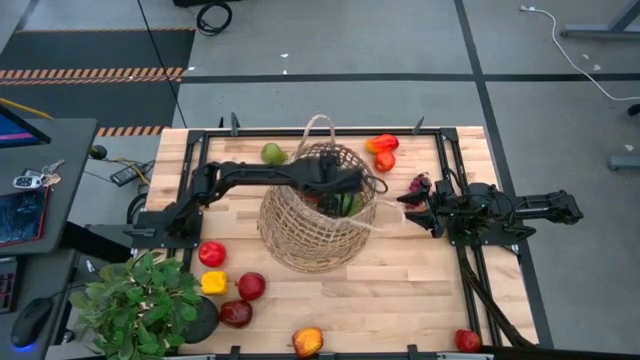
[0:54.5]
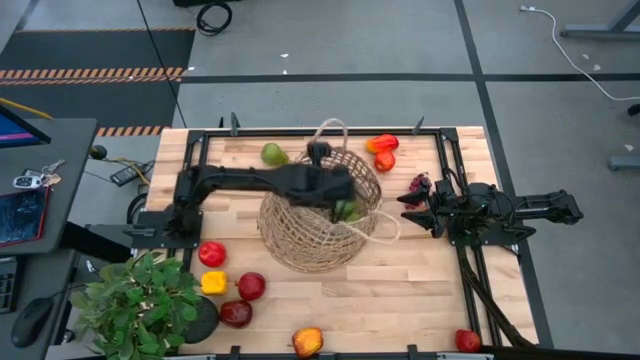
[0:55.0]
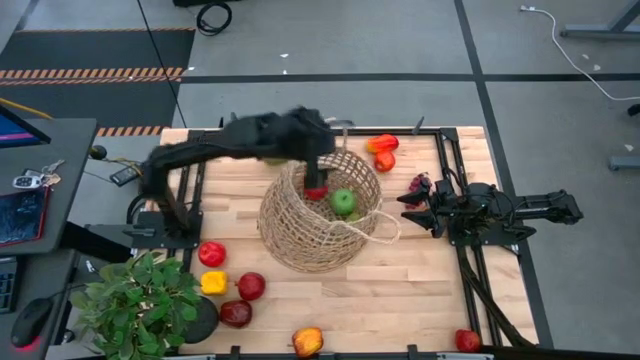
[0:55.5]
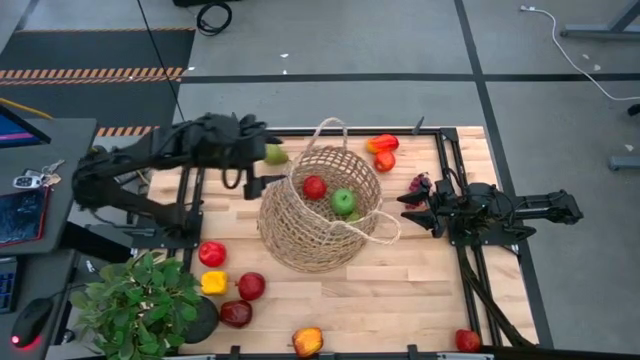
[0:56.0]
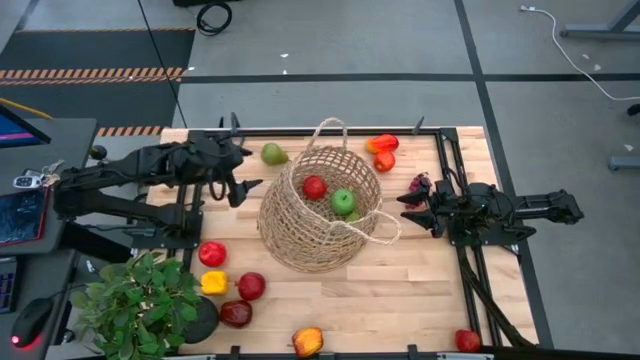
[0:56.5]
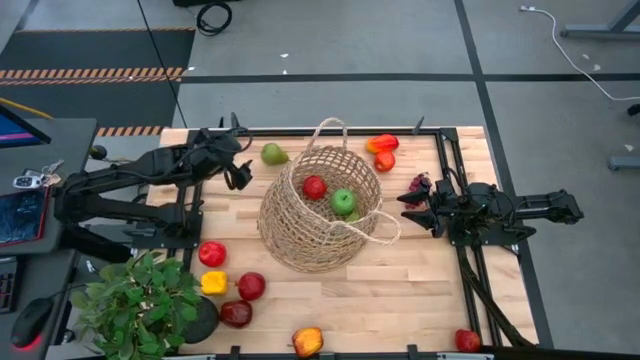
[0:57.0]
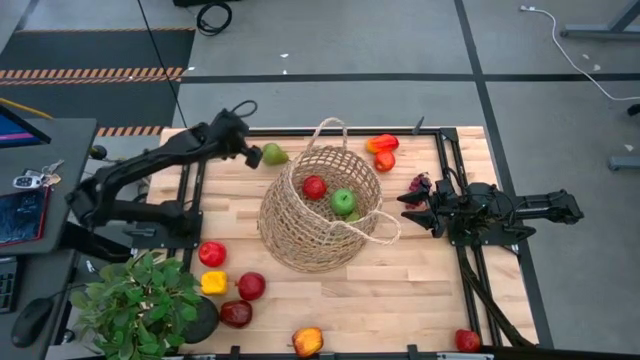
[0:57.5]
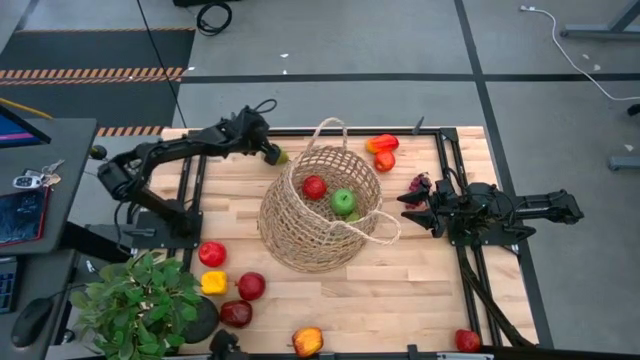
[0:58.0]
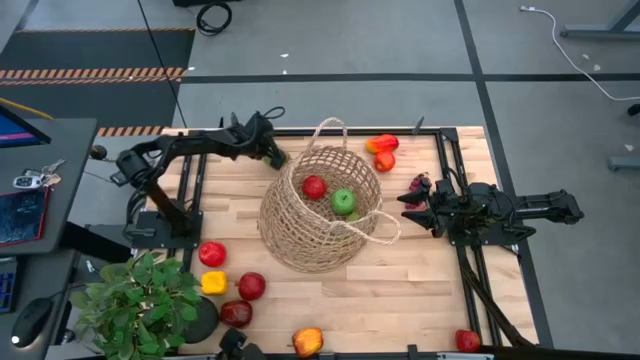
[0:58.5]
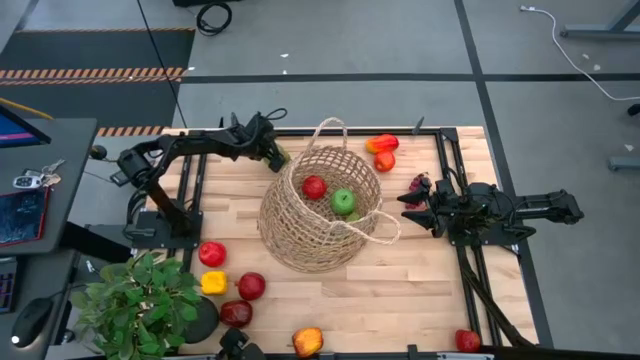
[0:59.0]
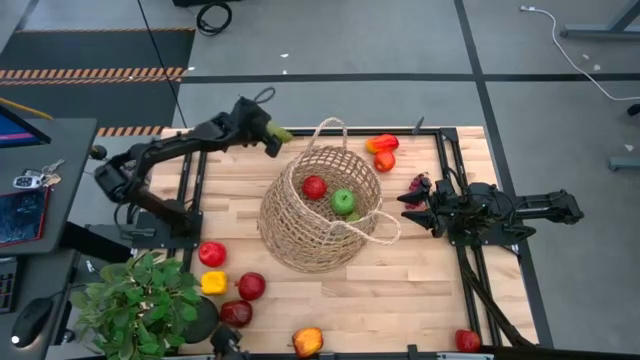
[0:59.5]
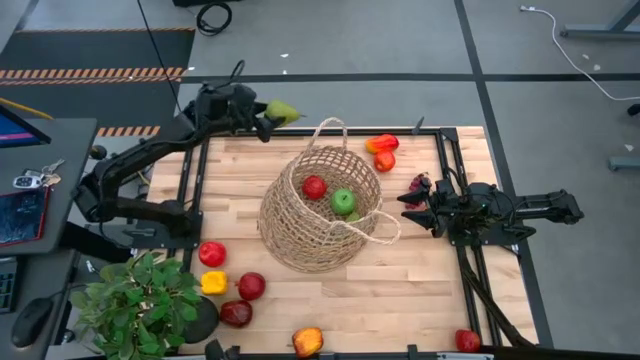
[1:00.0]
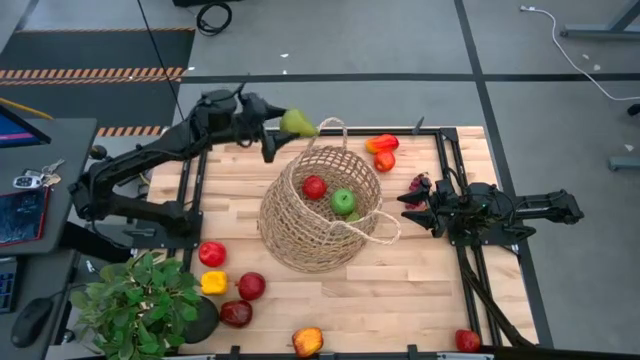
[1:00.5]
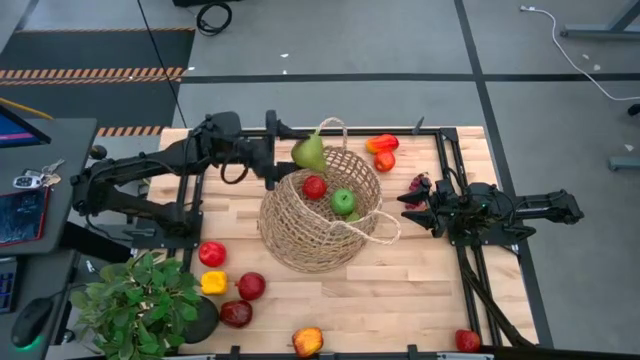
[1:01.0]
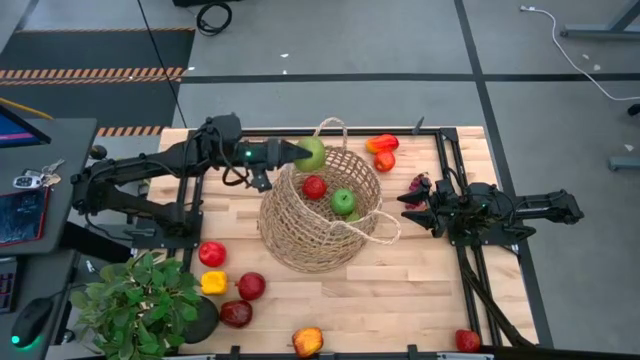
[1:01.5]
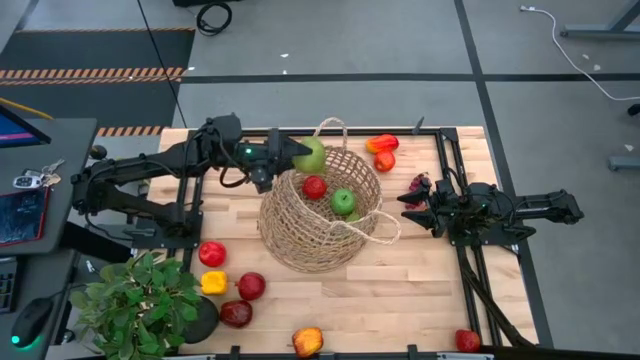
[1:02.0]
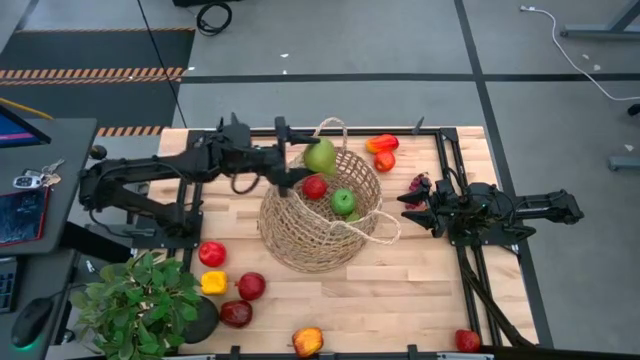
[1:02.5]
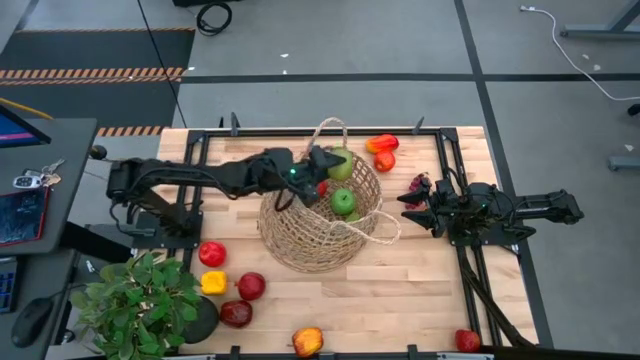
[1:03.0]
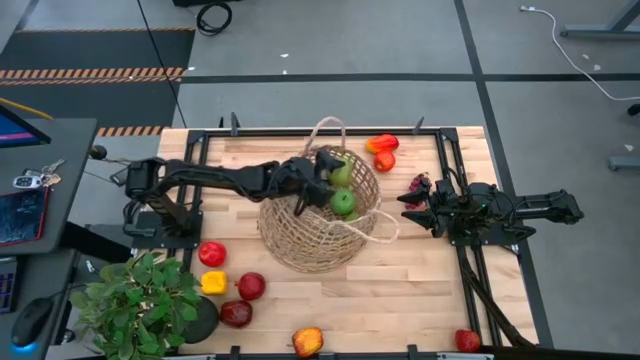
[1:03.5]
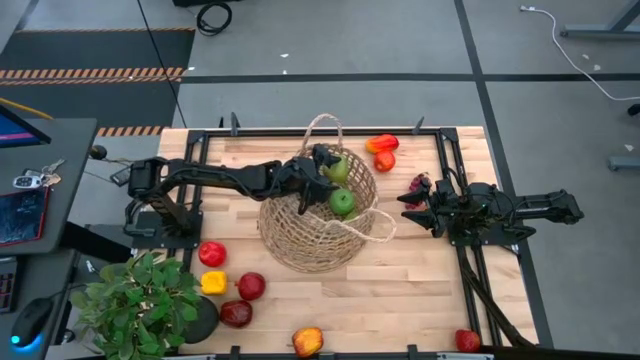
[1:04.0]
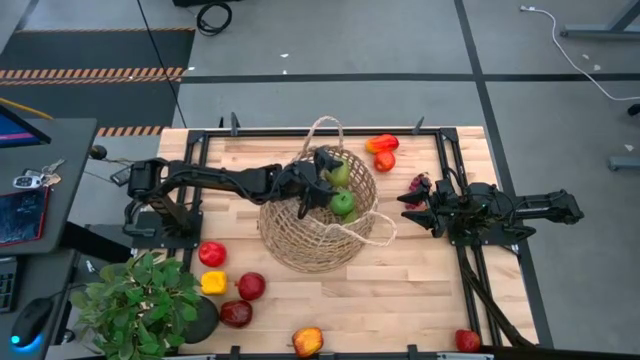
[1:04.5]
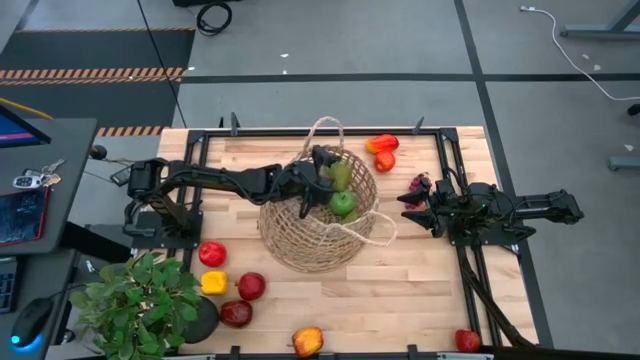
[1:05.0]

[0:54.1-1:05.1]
Task: Build produce basket
Put the green pear into the basket

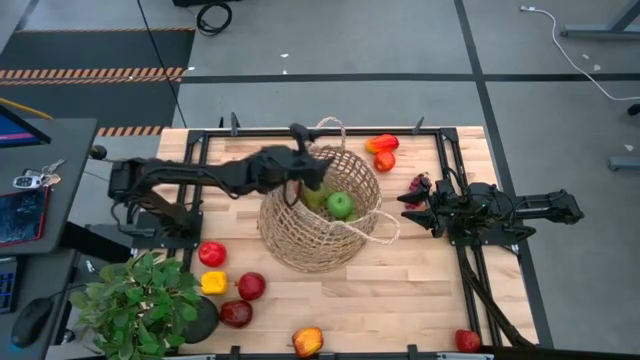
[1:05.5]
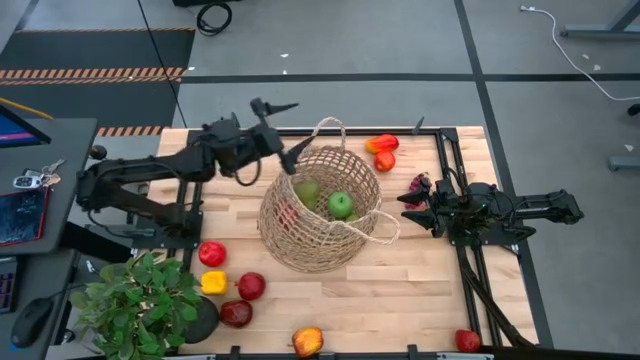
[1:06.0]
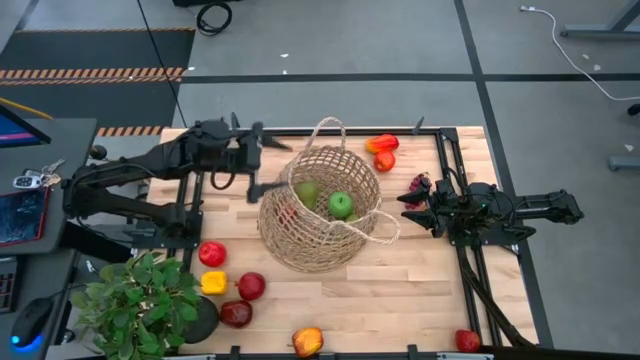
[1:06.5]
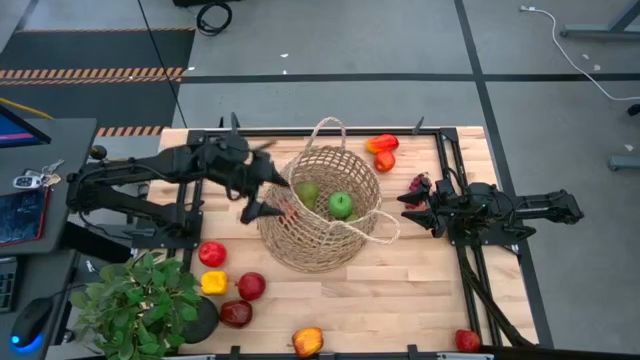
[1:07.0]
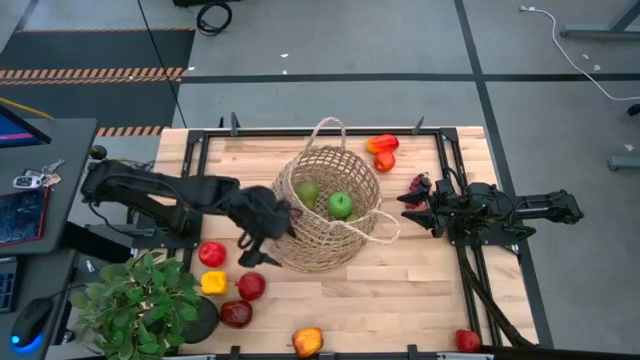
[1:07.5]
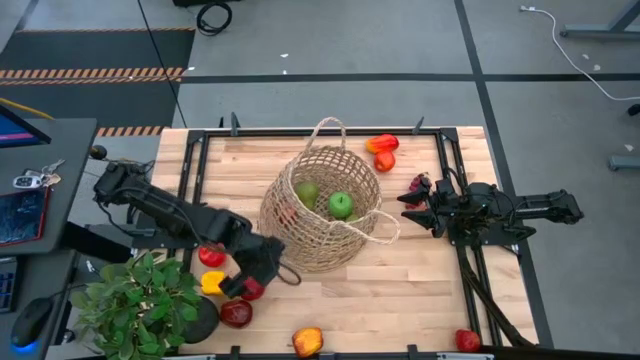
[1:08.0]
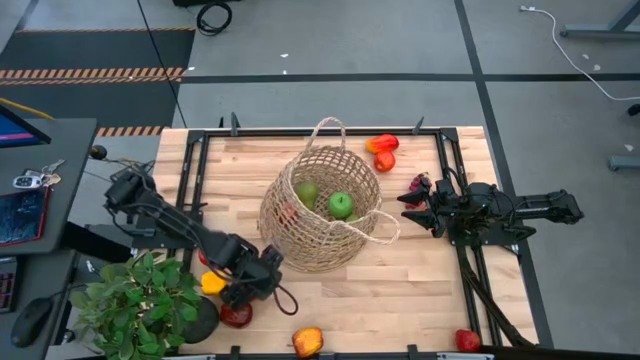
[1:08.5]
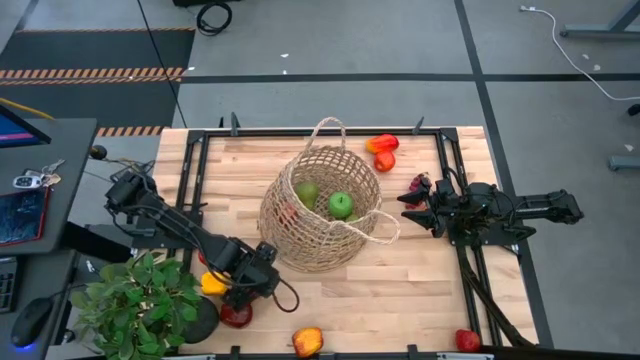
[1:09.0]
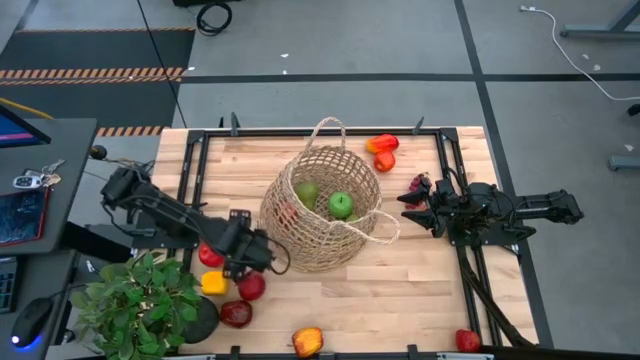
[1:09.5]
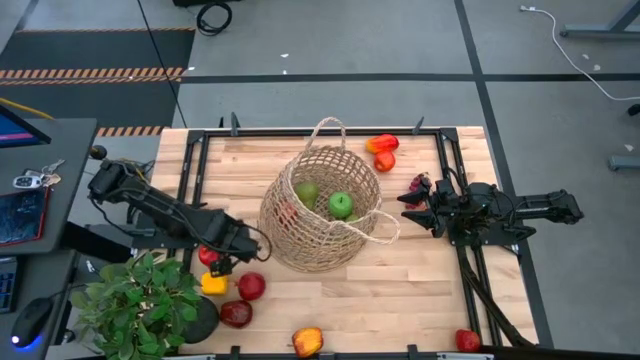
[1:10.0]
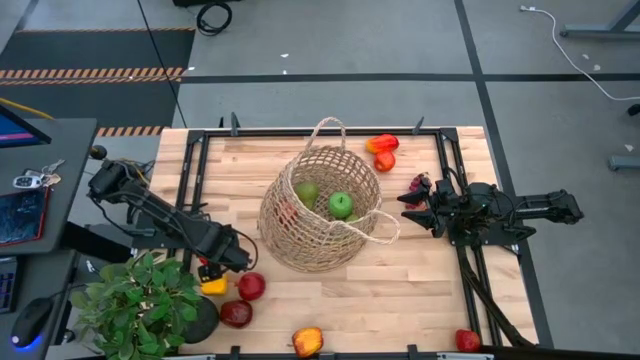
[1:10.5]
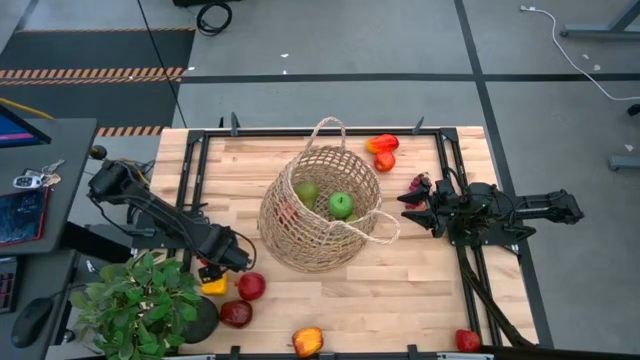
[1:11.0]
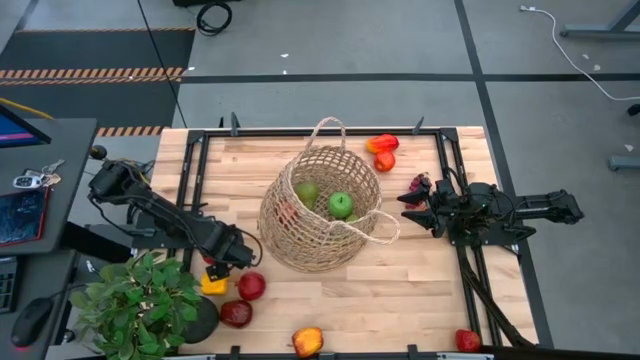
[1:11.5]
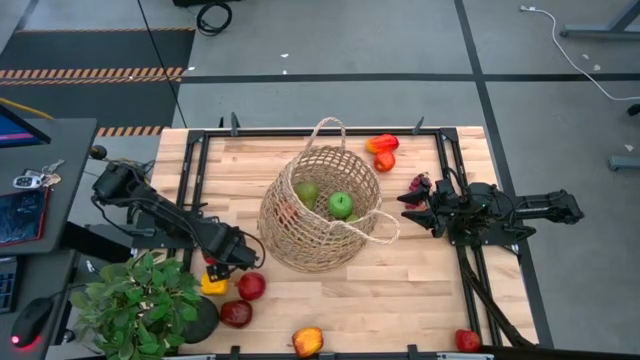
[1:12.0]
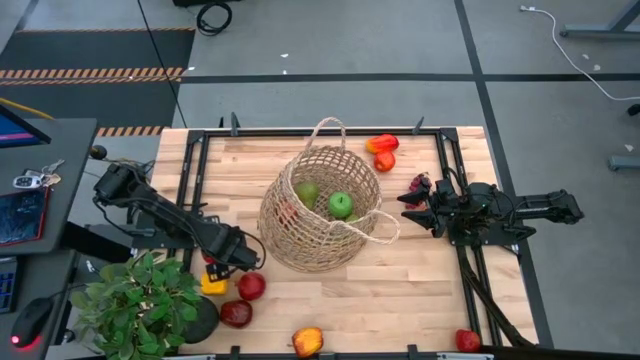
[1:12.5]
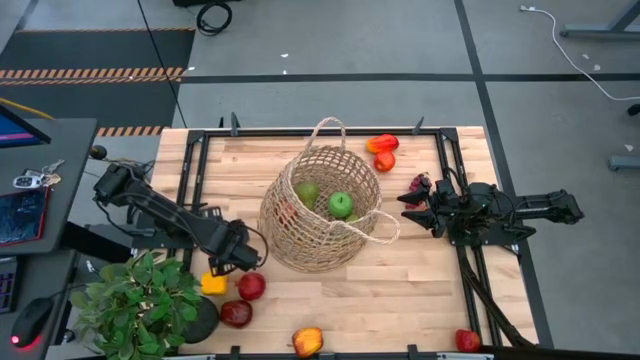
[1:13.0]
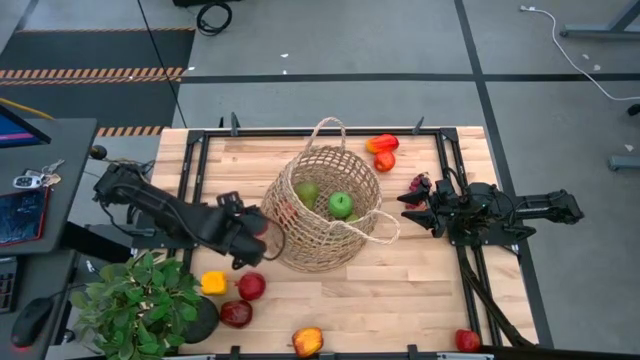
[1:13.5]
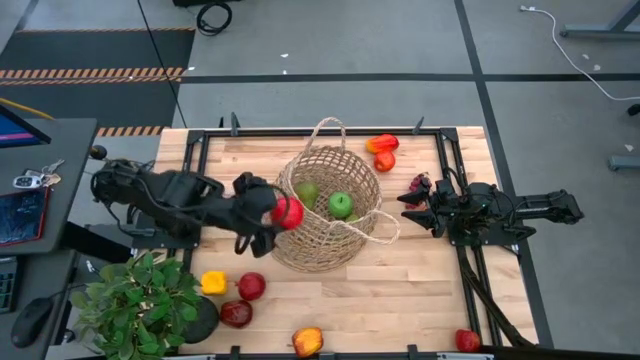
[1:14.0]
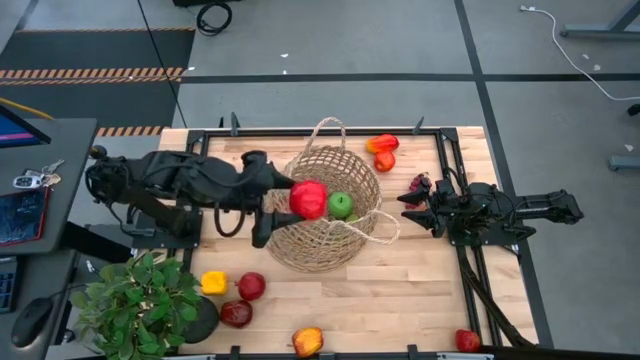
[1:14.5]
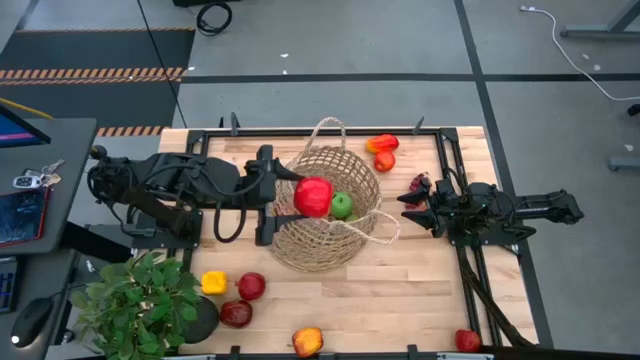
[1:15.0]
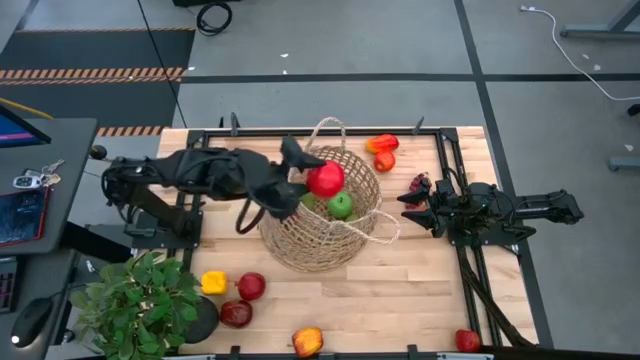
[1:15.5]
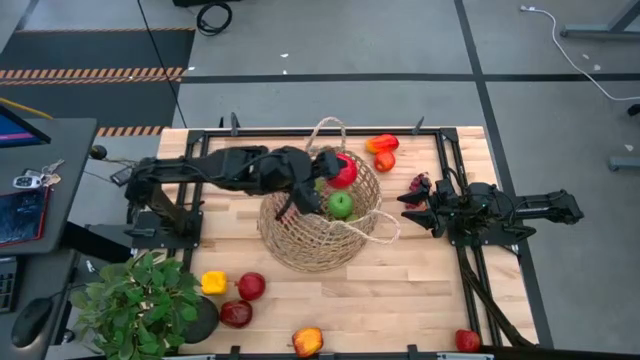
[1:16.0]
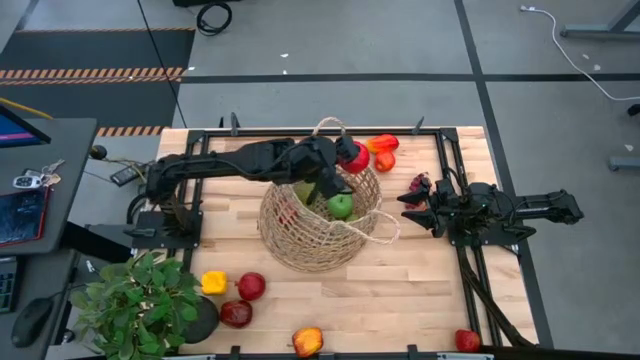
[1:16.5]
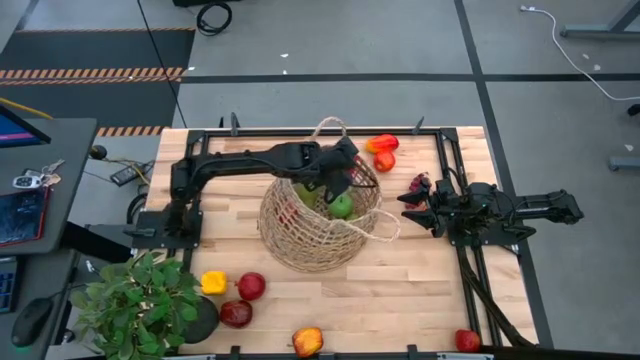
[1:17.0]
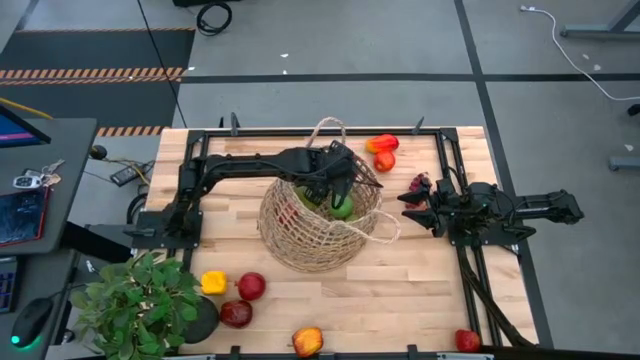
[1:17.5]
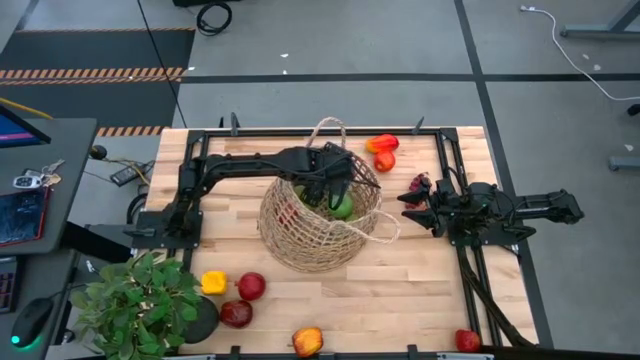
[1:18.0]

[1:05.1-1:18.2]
Put the pomegranate into the basket
